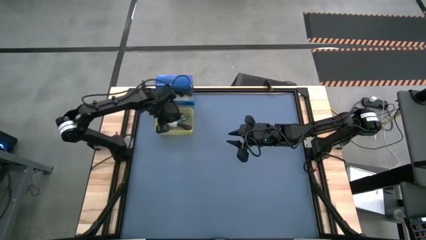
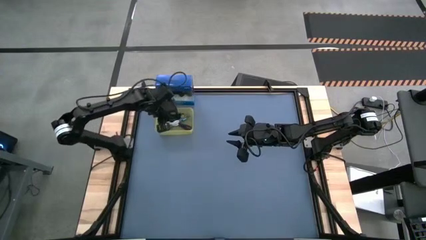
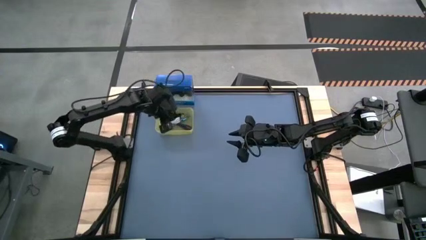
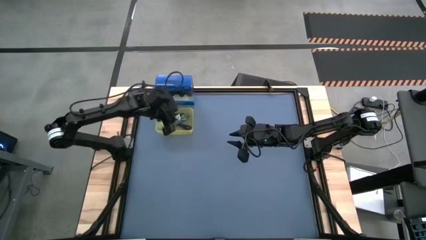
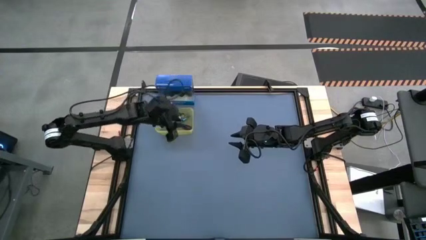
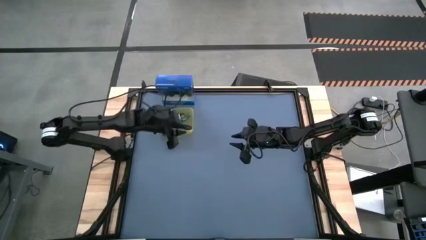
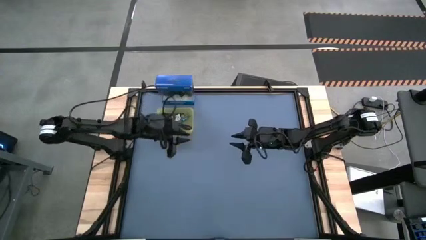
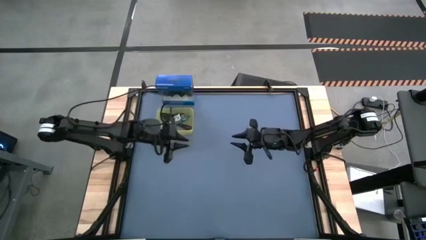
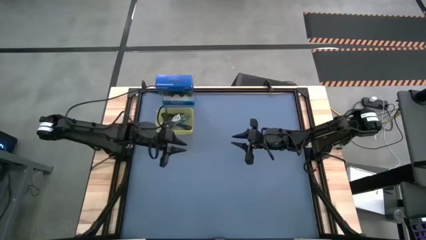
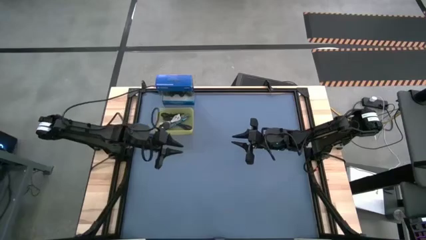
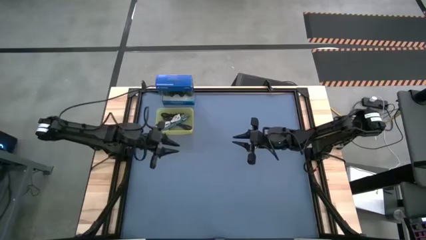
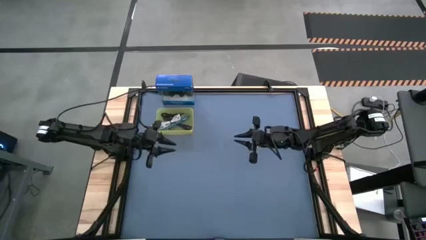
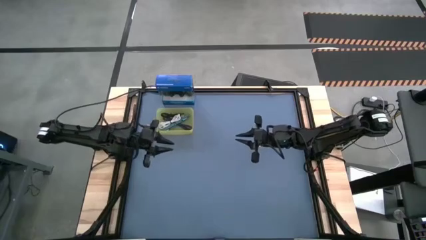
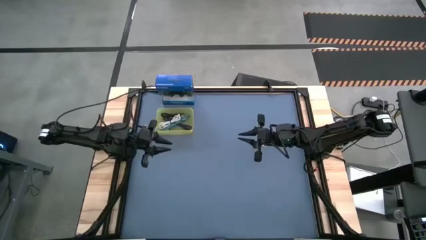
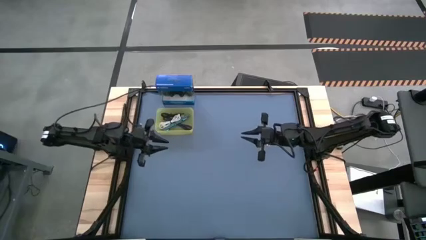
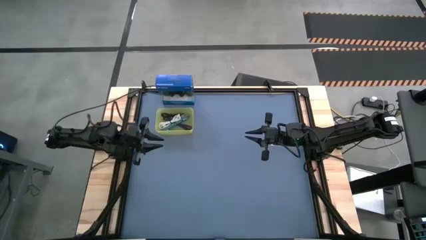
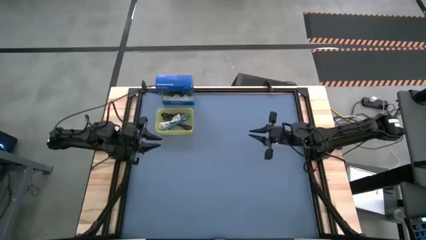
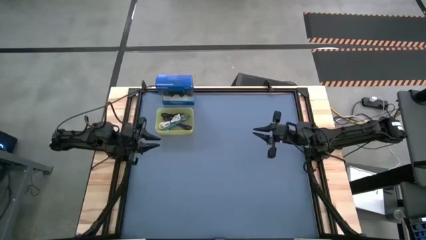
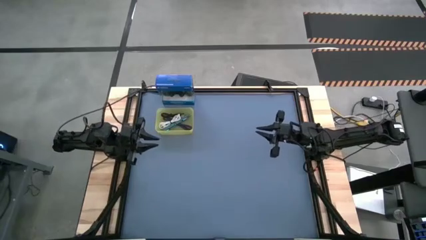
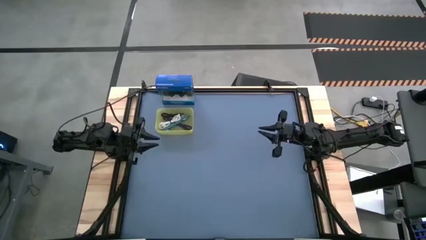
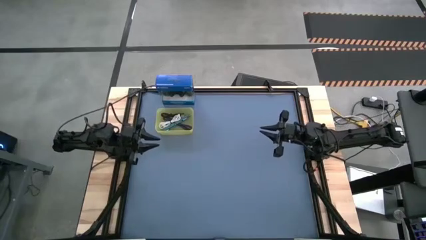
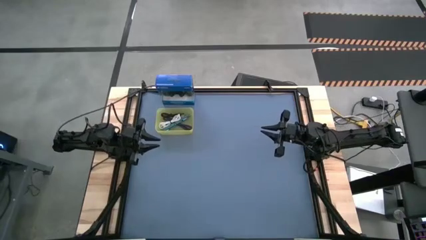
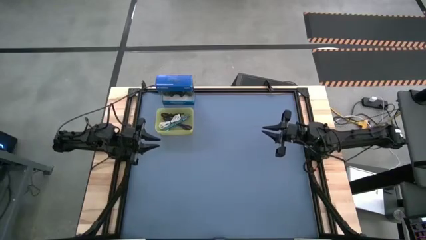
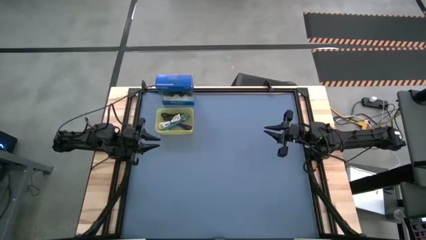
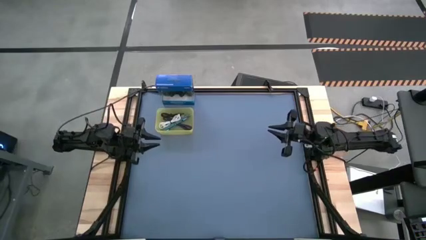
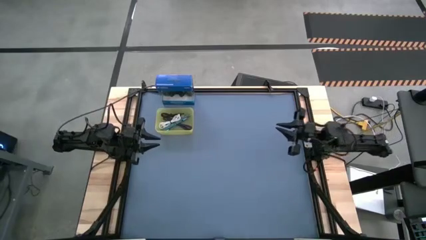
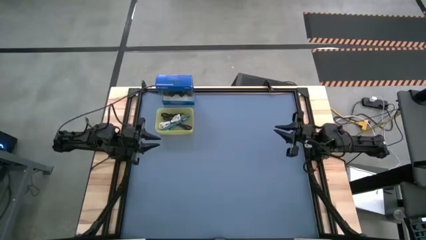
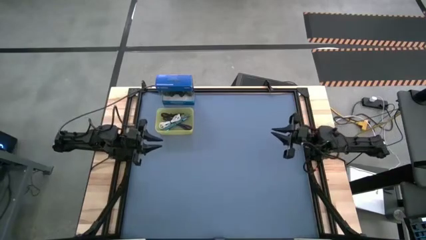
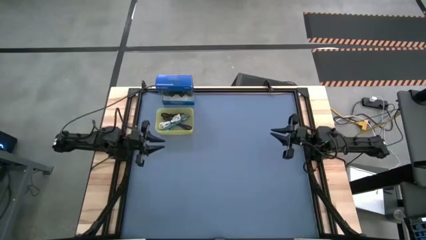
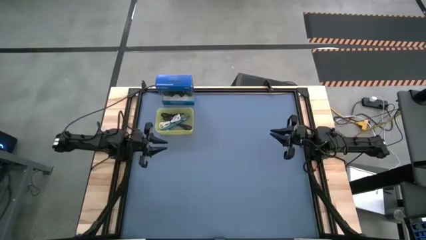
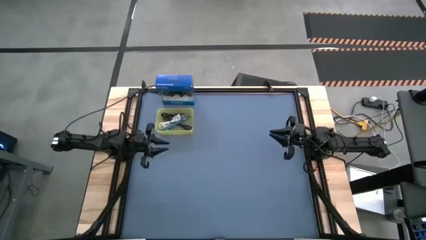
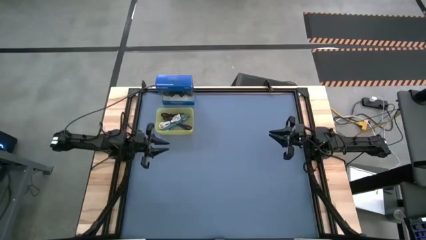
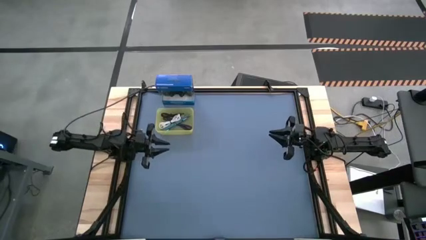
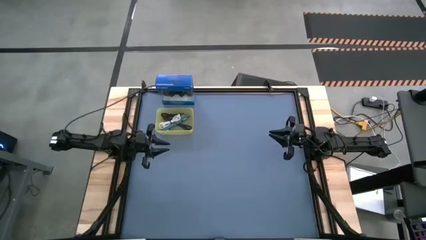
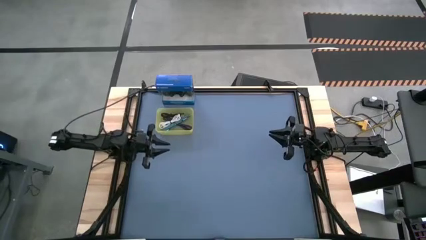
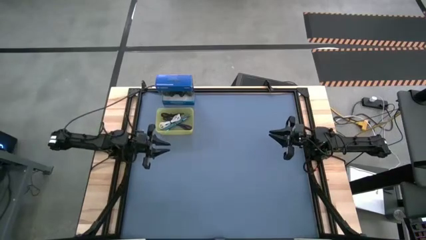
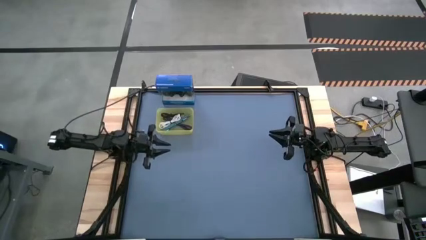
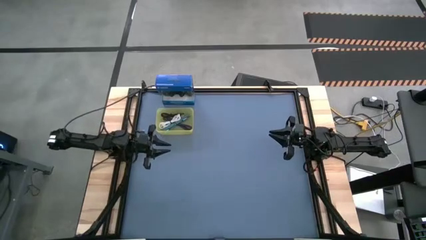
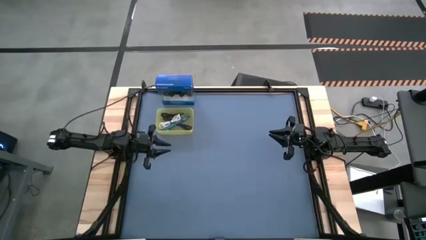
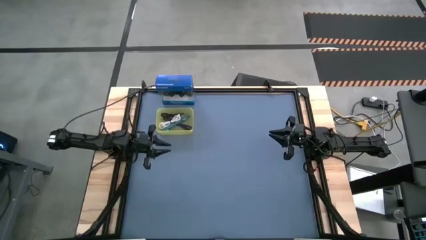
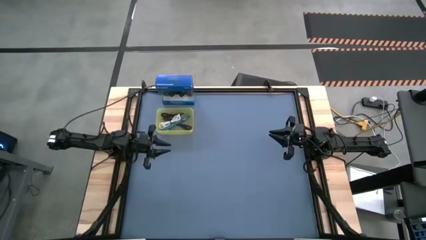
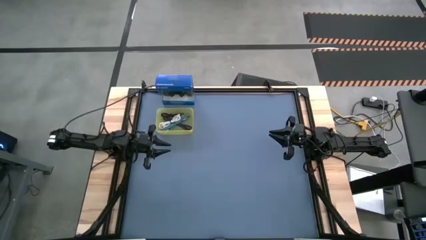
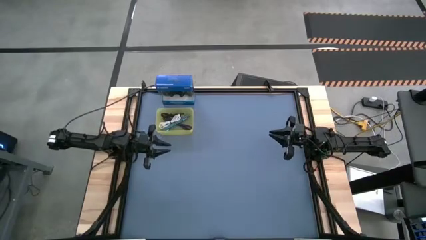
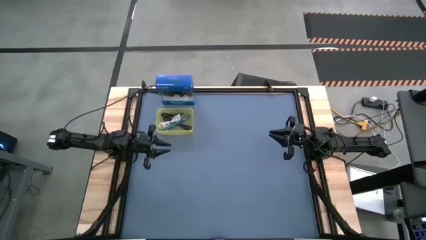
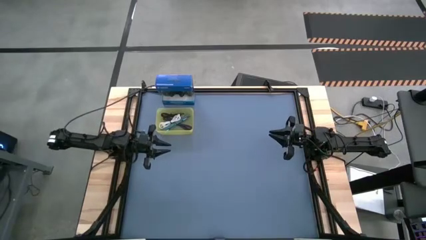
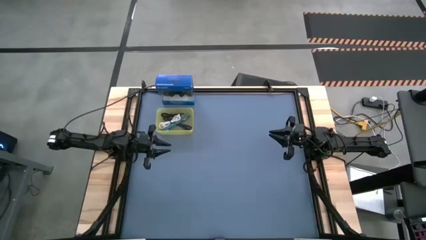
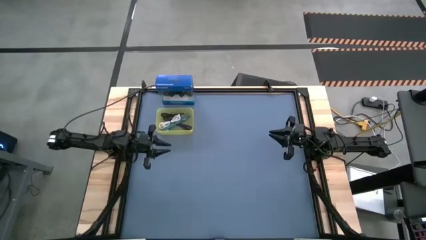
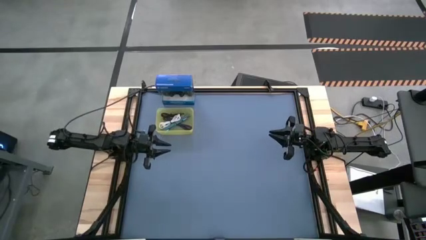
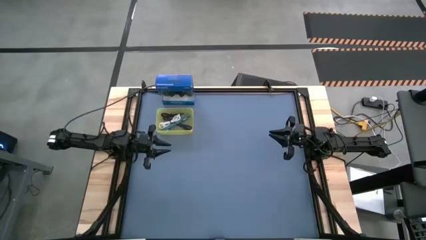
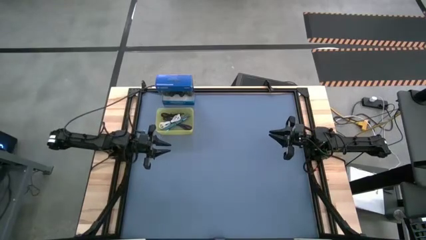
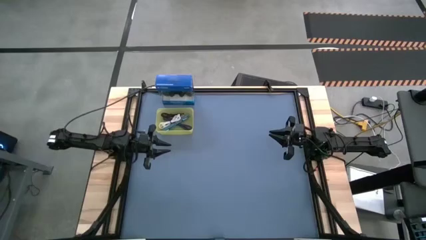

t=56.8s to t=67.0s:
Task: Pick and place USB-C Cables
Return to Home Position
